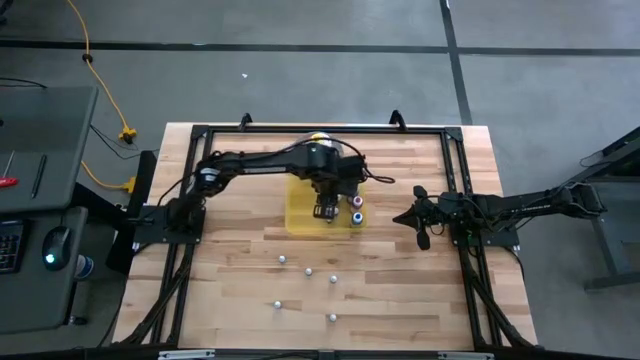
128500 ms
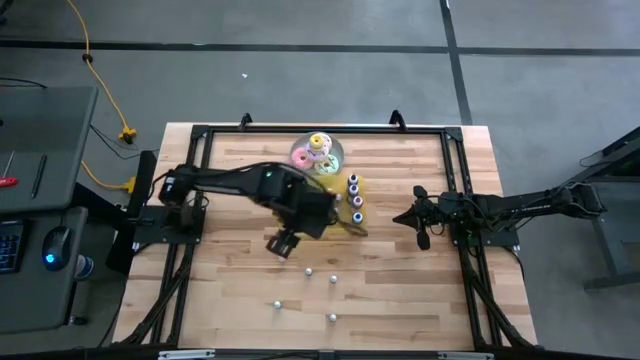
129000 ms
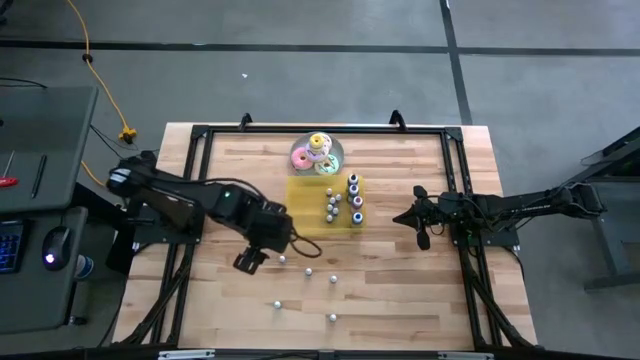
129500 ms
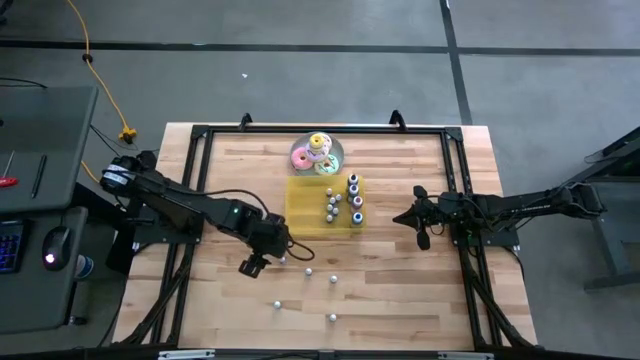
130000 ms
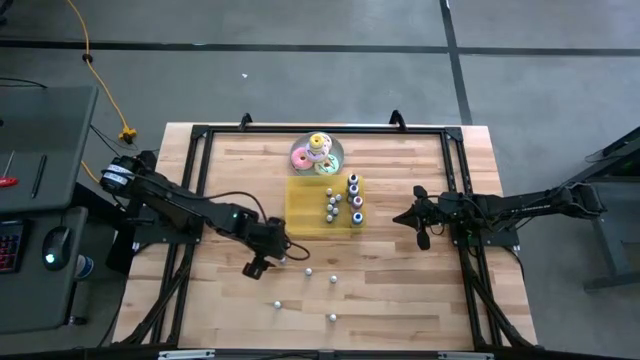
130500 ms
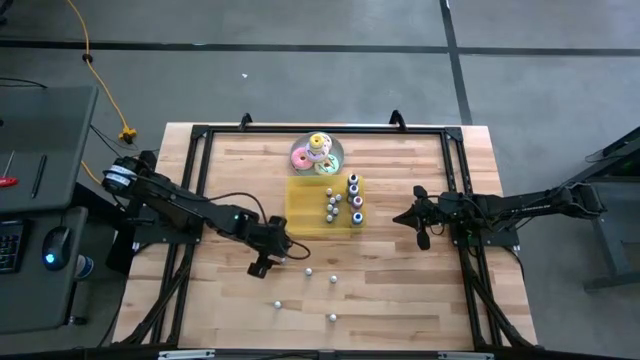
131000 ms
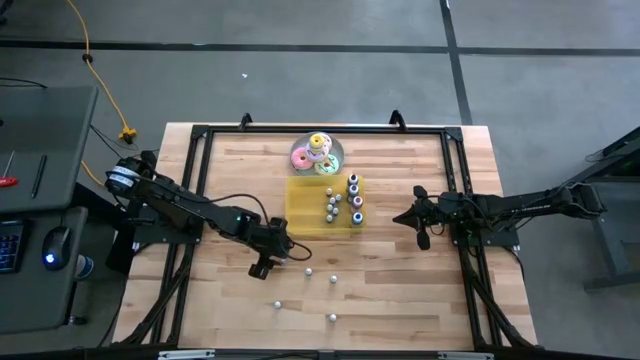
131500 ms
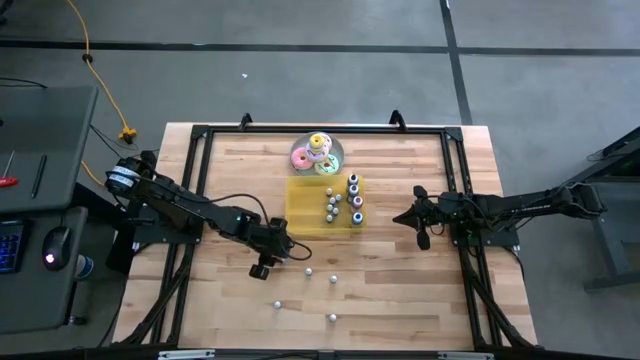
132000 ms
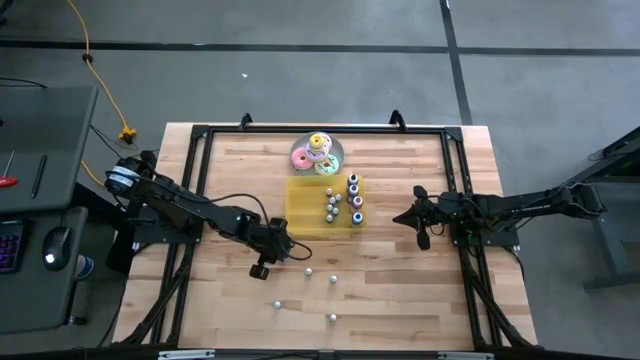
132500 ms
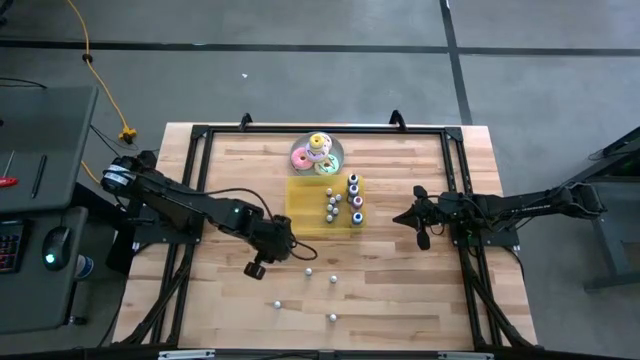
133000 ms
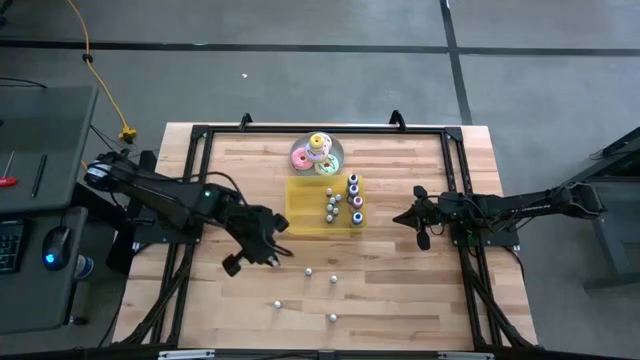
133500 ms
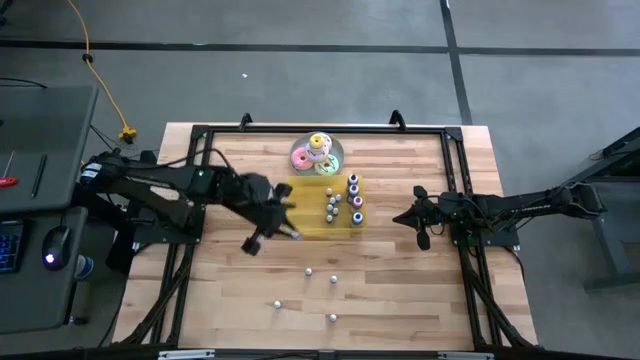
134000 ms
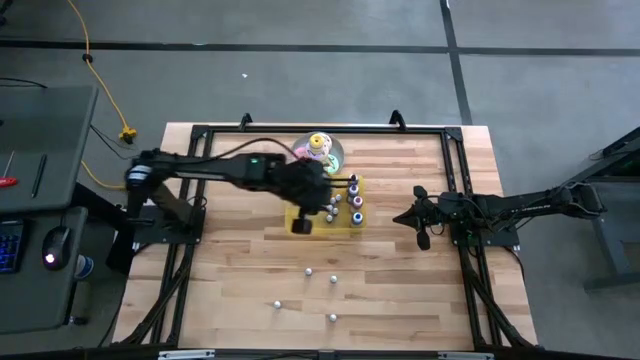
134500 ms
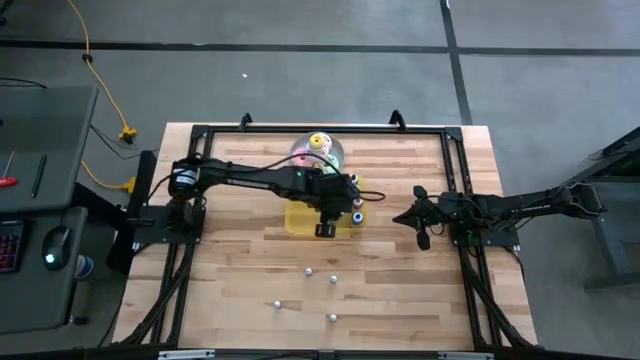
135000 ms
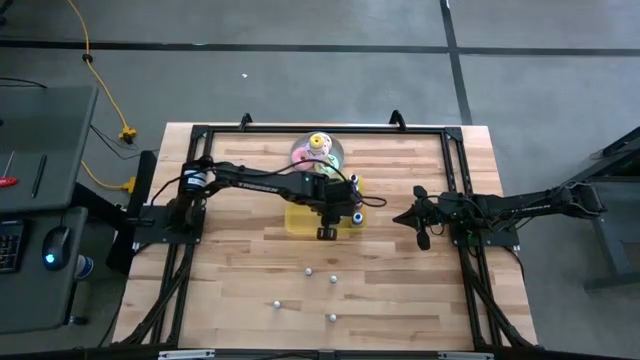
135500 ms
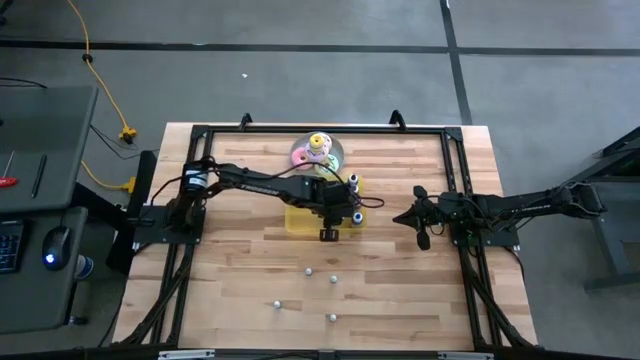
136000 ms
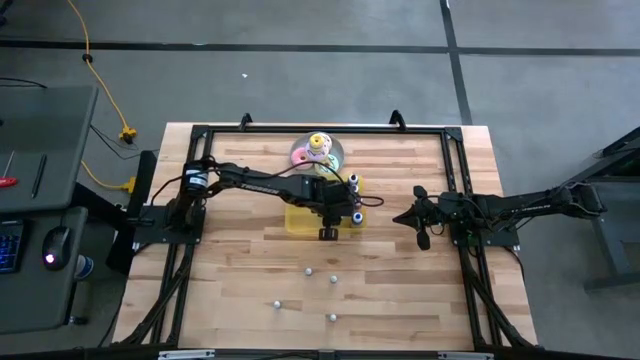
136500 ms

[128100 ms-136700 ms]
Task: Pick & Place food coloring
Put the top small black food coloring bottle into the yellow container

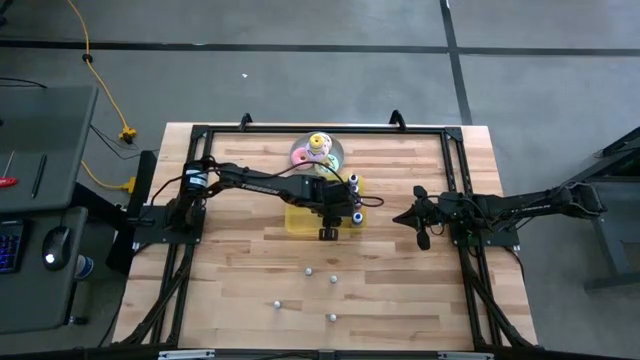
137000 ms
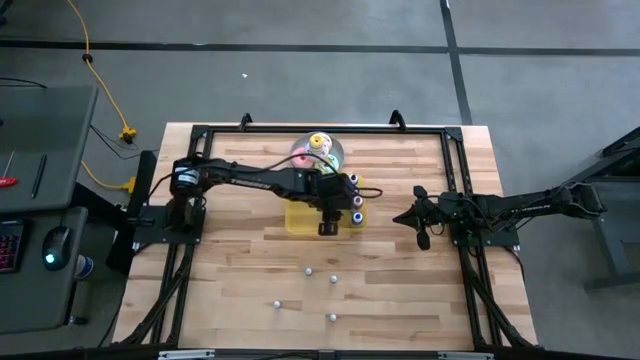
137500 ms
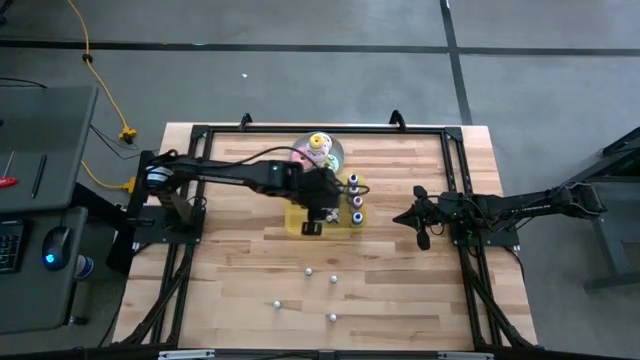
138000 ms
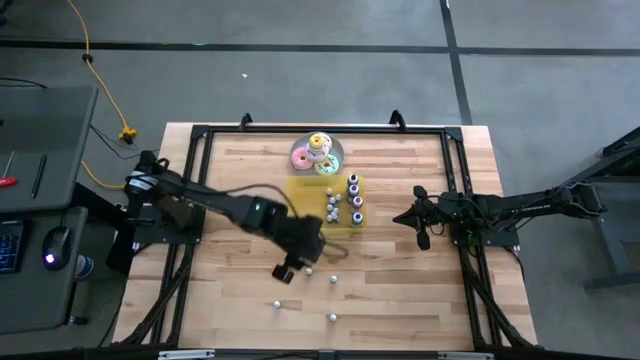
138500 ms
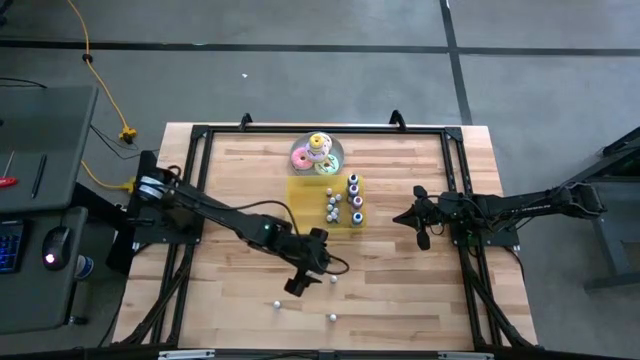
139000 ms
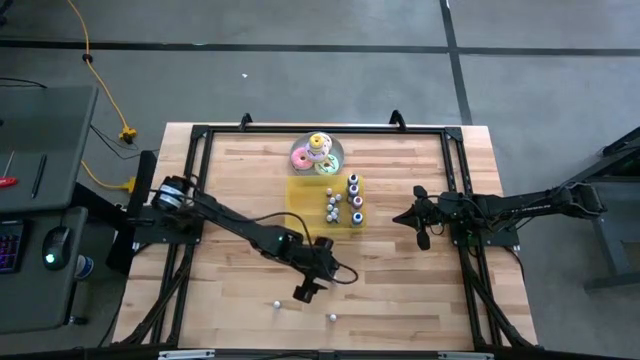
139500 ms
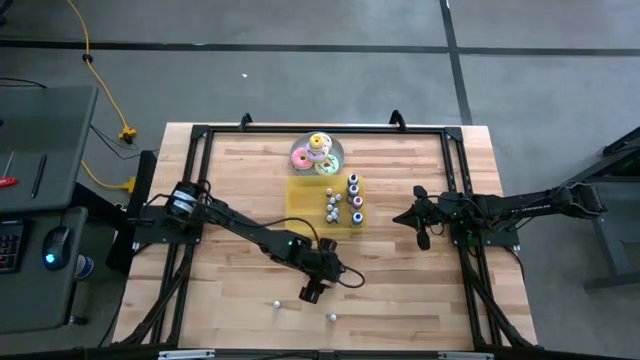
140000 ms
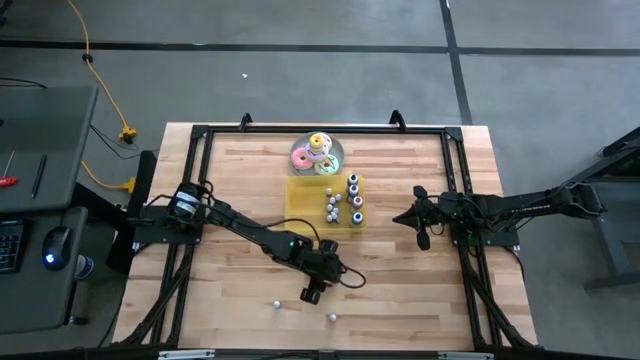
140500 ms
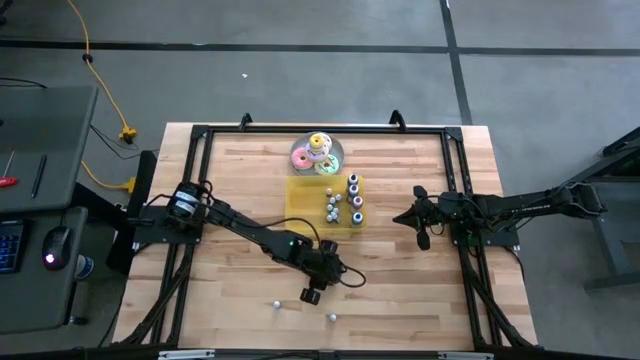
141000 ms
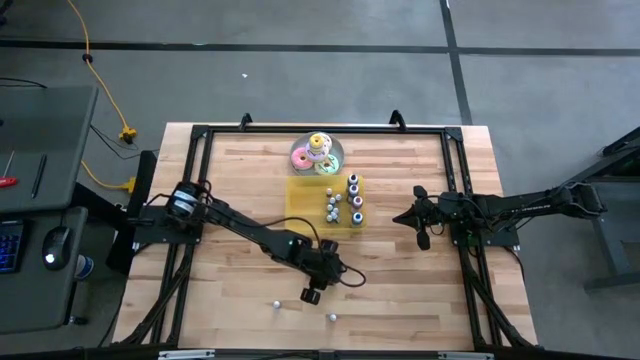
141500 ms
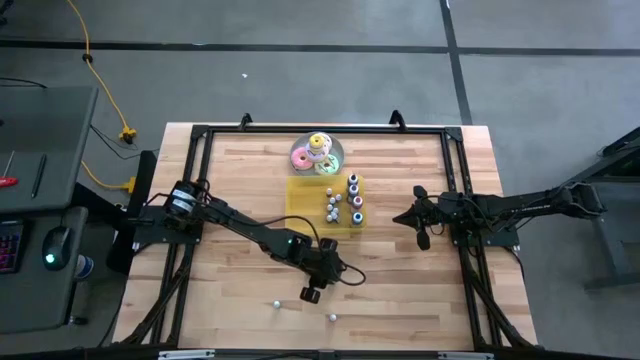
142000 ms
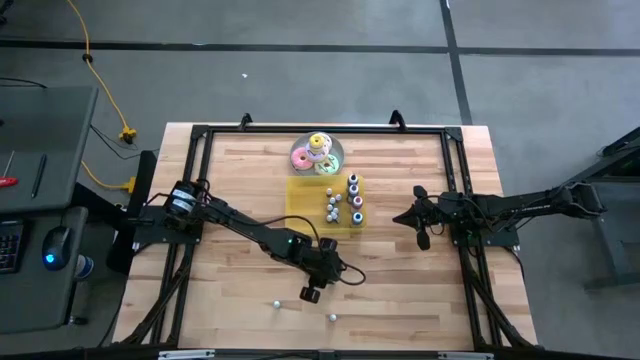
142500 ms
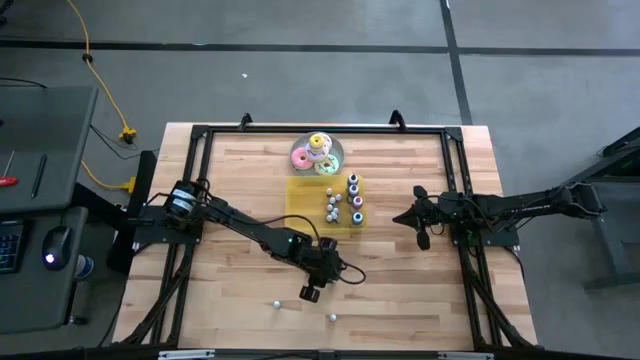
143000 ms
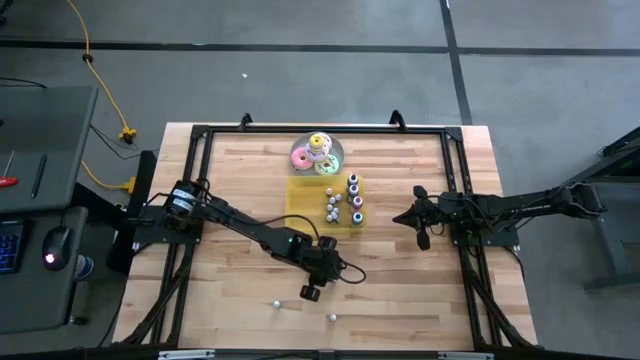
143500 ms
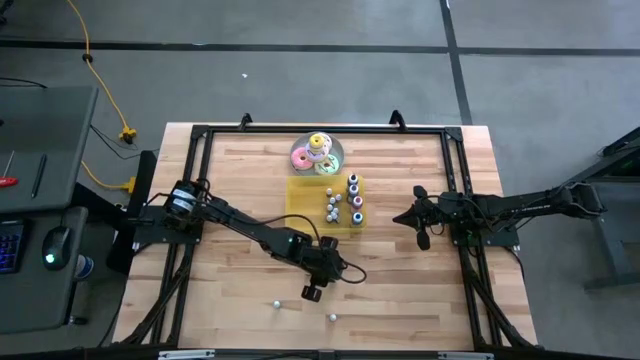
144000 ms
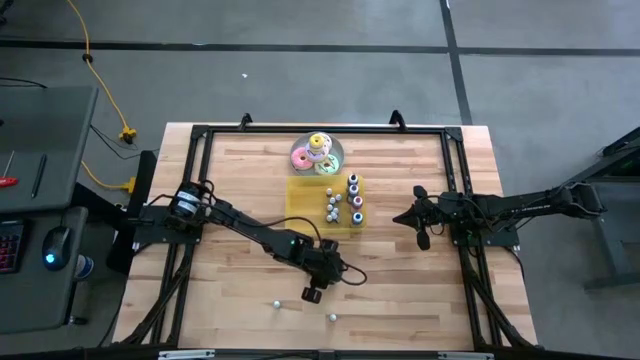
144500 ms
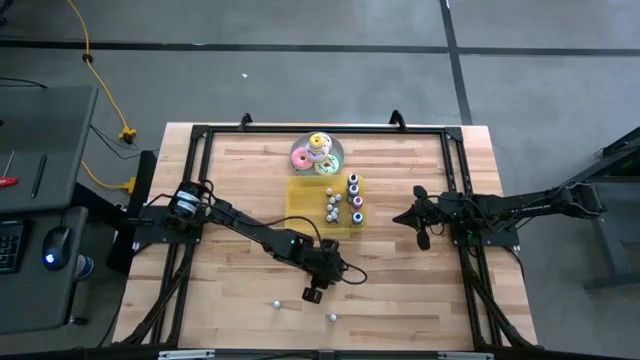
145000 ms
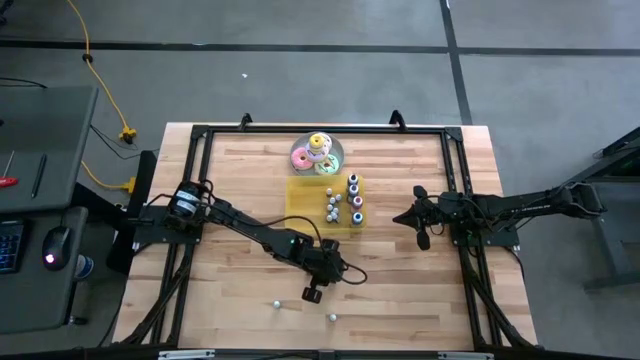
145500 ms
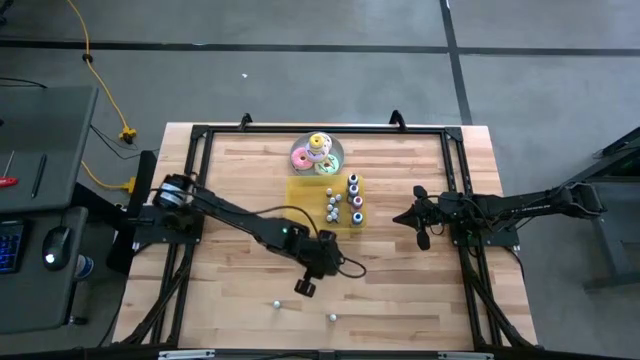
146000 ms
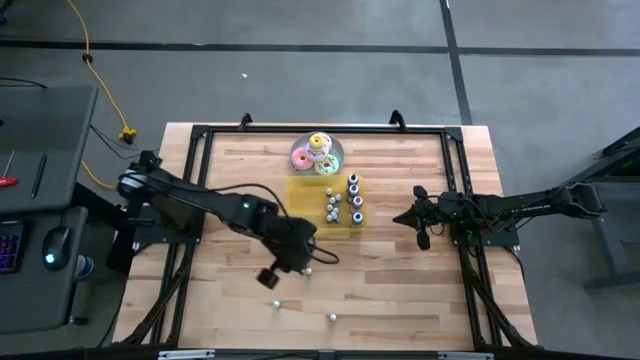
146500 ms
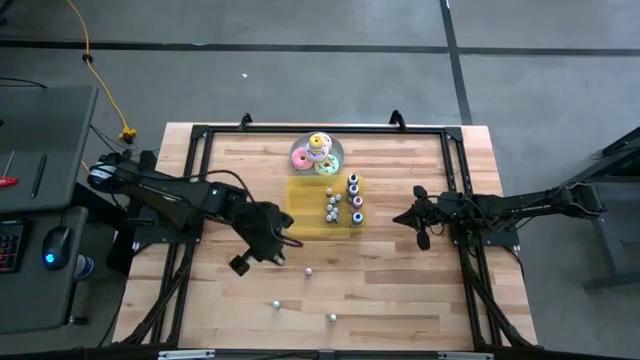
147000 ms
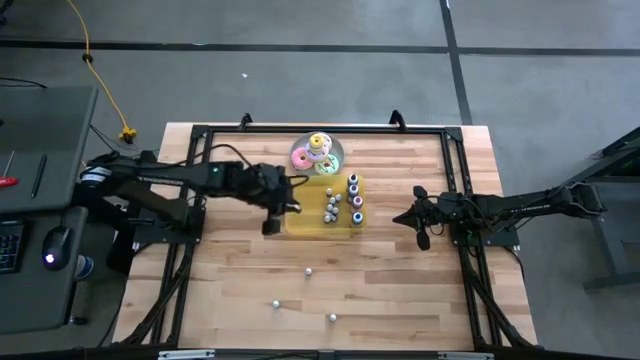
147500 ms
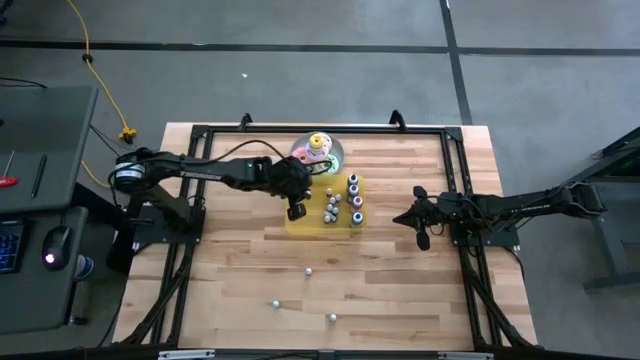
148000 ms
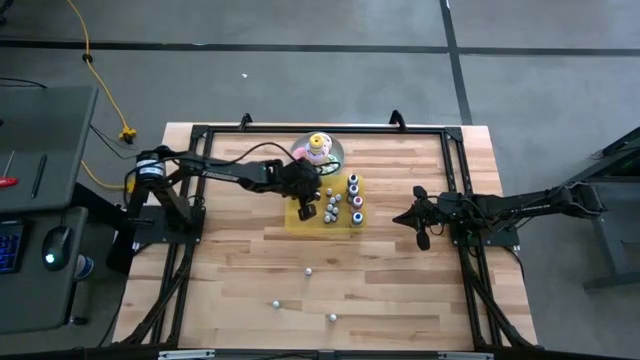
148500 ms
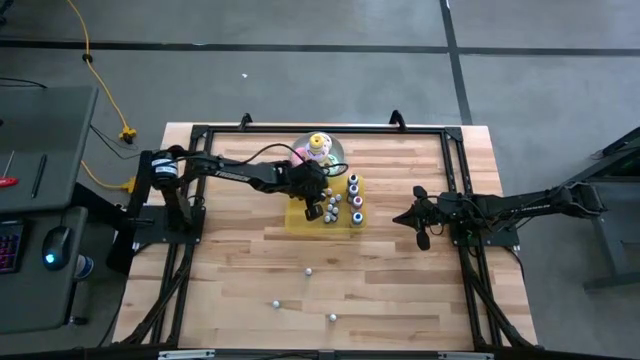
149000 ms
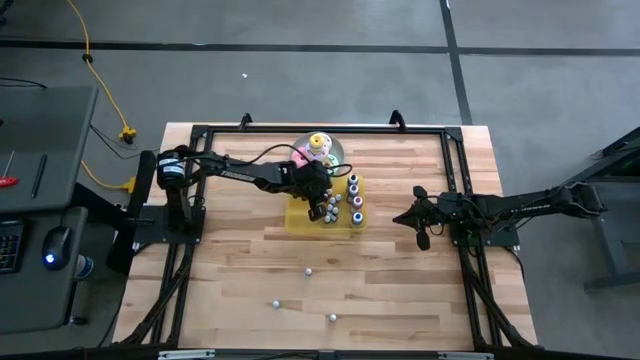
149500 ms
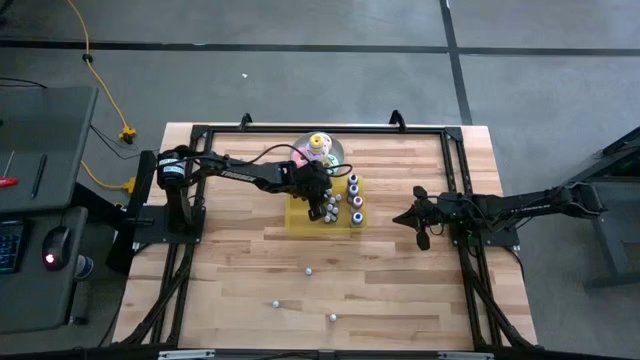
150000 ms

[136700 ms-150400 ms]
Put the small green food coloring bottle into the yellow container
